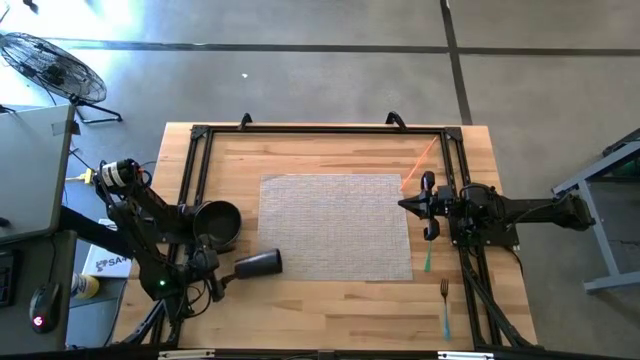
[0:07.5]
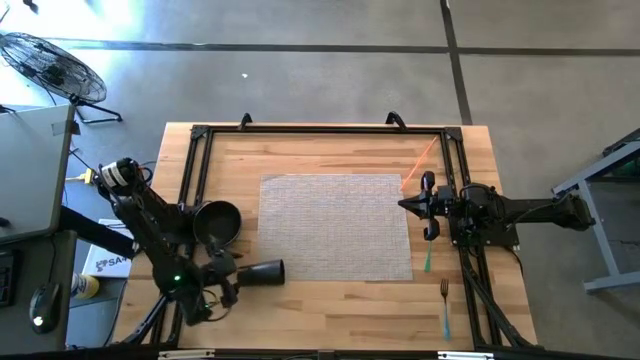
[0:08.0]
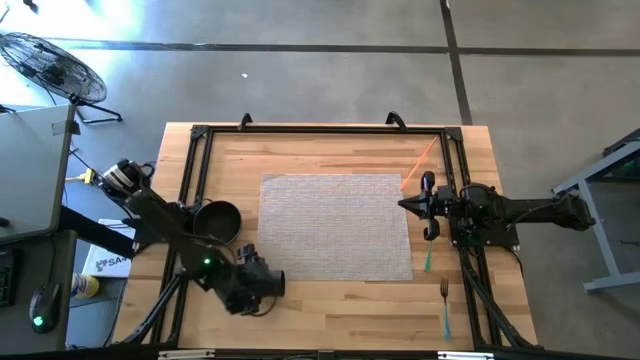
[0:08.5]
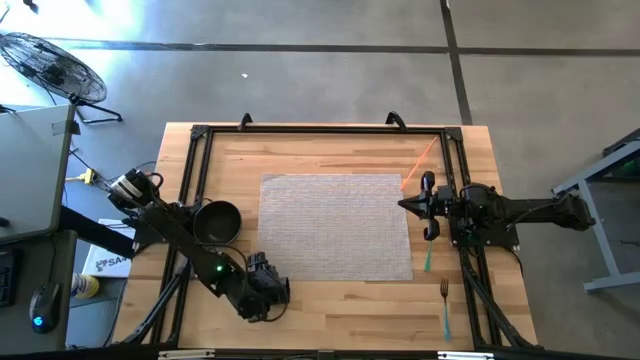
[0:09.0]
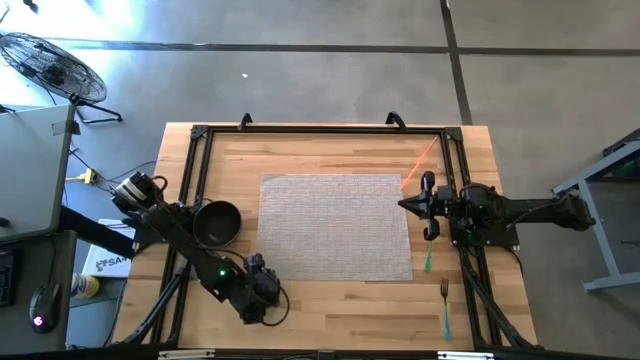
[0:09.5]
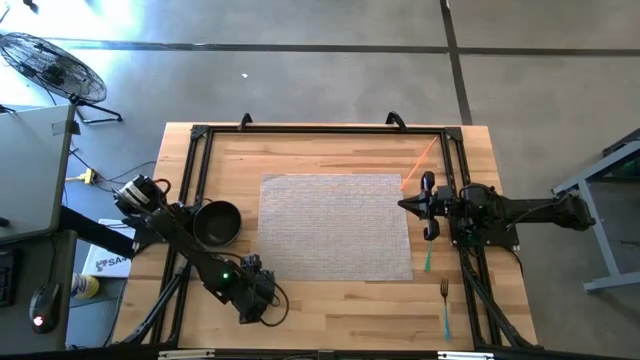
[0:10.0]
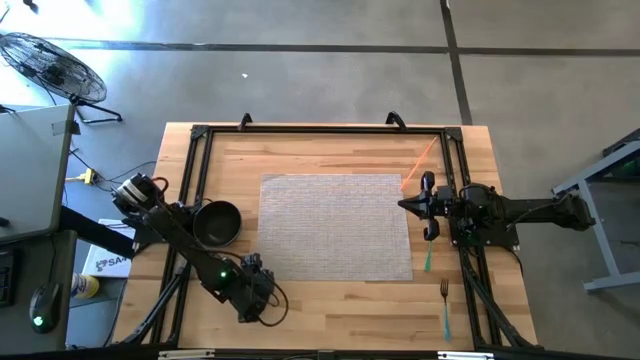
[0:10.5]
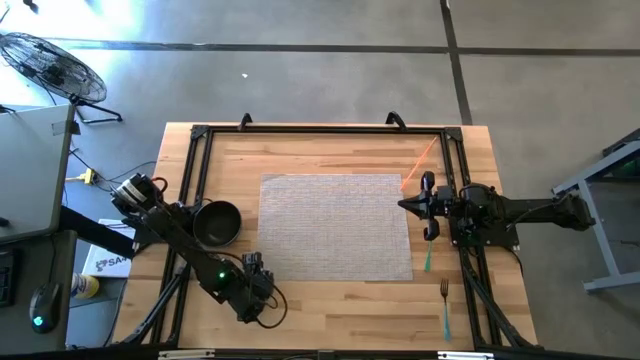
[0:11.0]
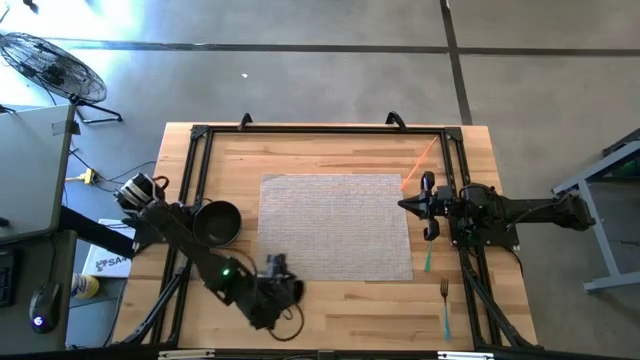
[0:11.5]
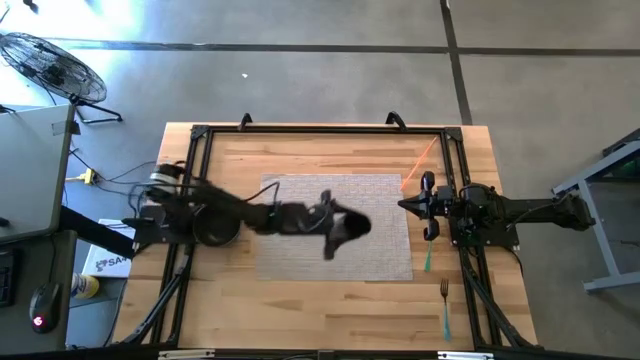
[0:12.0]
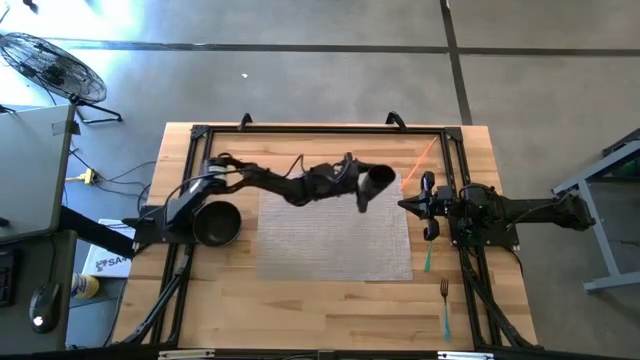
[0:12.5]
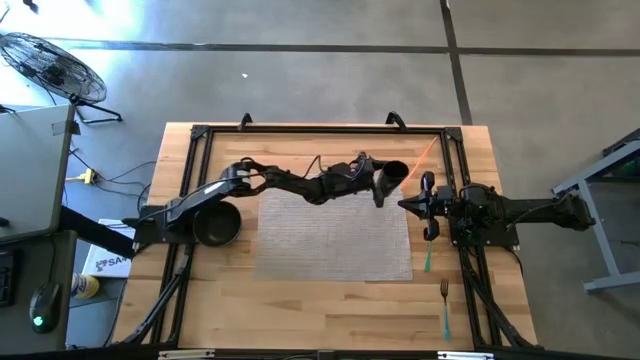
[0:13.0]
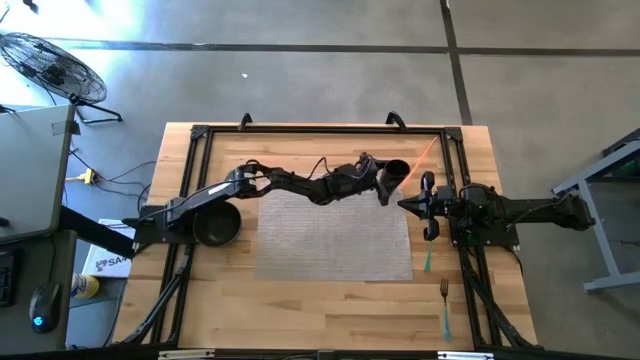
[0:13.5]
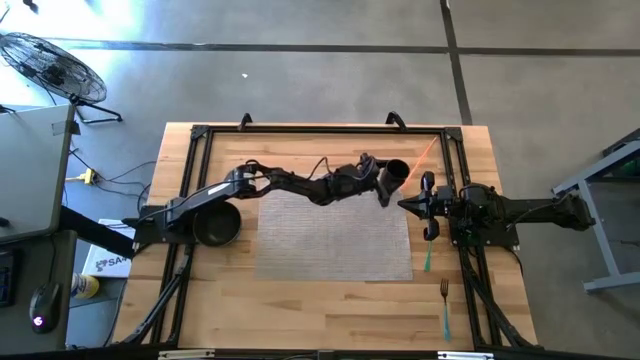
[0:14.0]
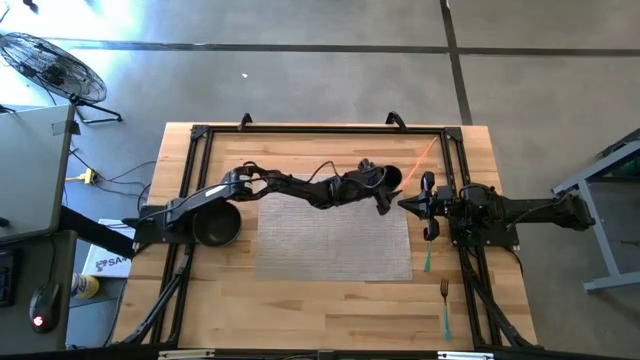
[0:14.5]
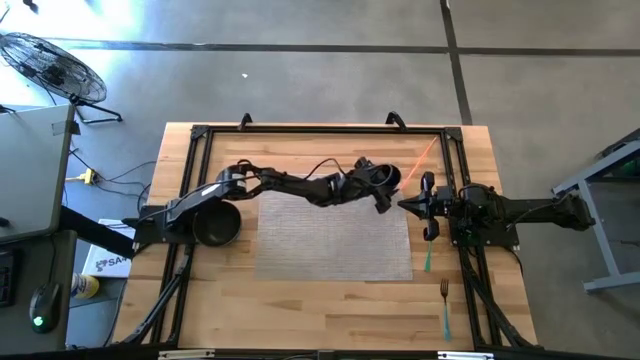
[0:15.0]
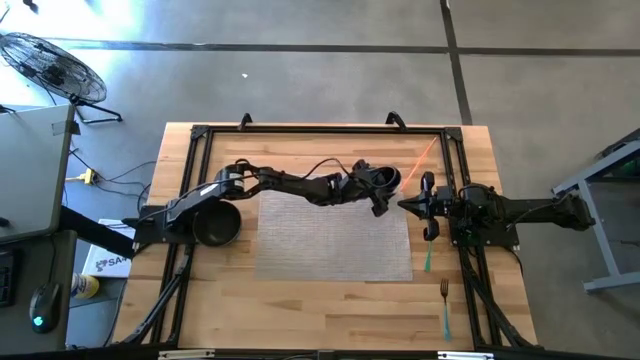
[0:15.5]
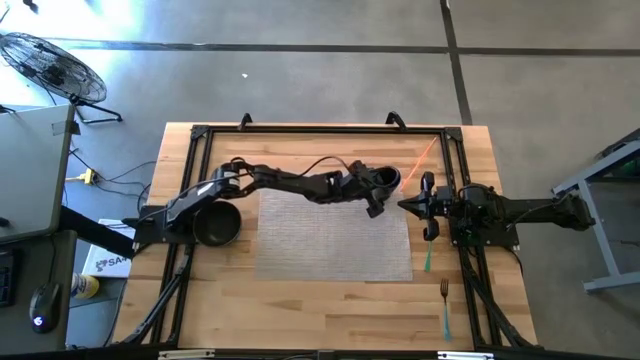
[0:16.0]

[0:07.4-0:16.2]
Task: Pick & Place Utensil
Put the black cup on the top right of the gray mat

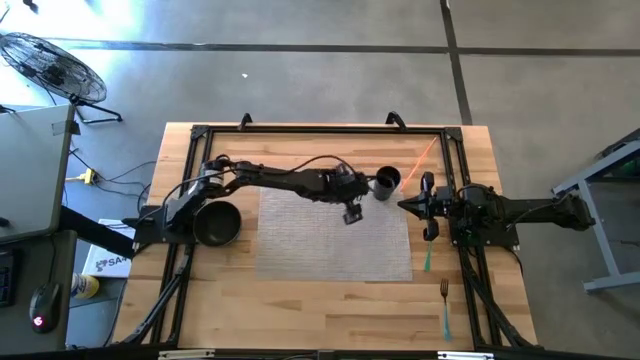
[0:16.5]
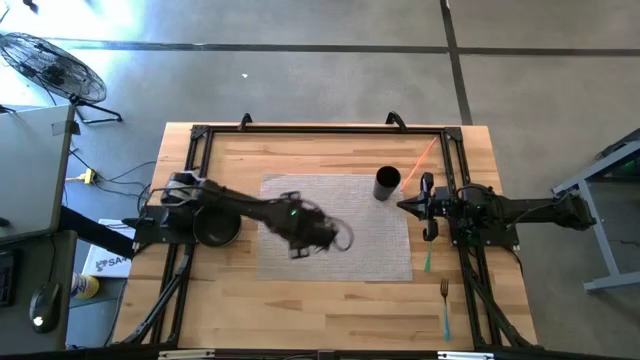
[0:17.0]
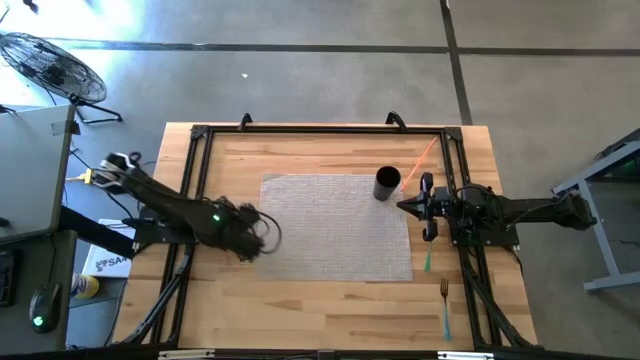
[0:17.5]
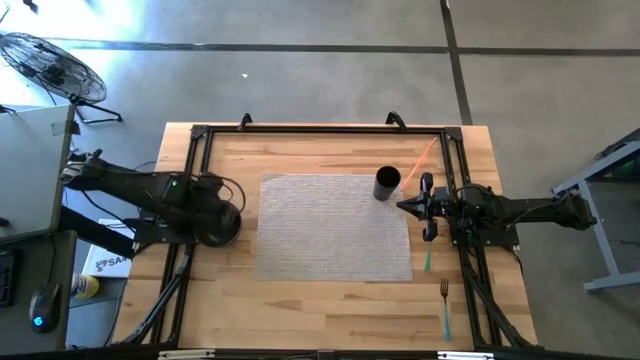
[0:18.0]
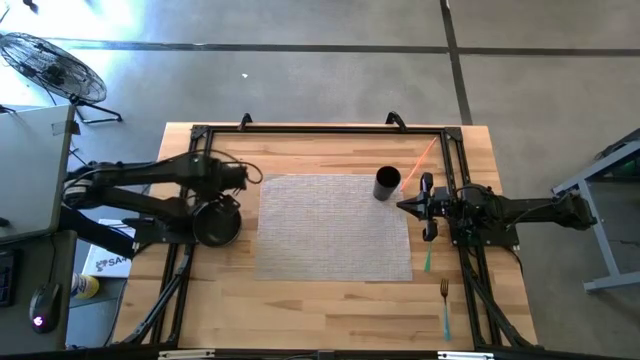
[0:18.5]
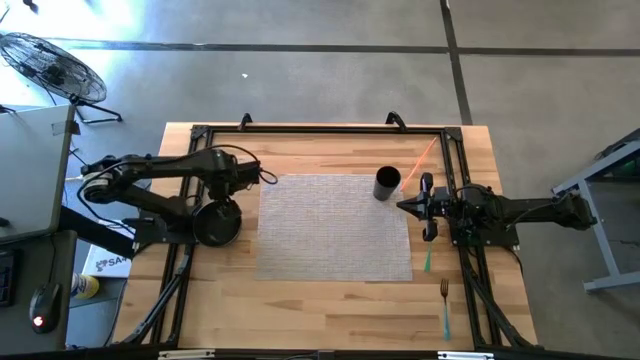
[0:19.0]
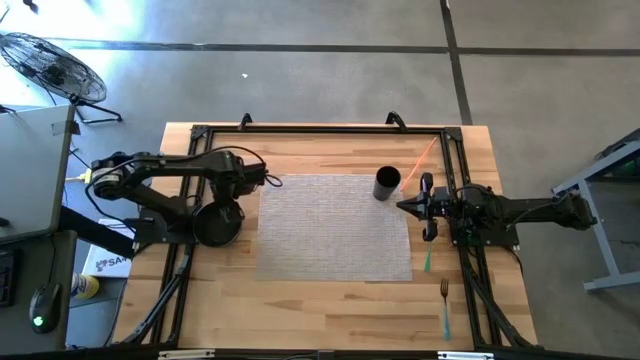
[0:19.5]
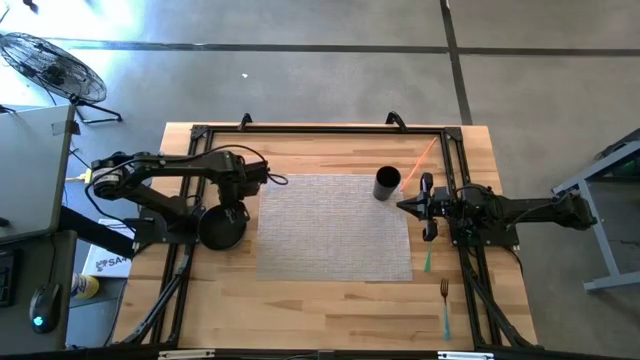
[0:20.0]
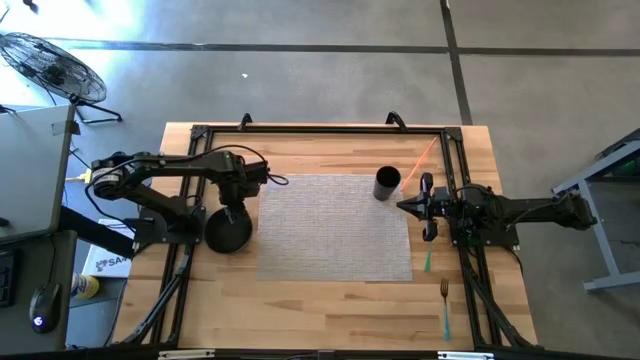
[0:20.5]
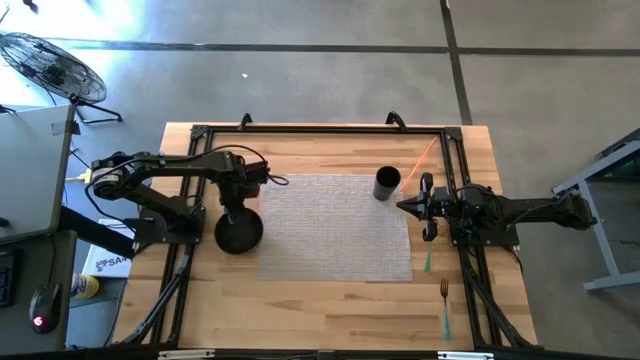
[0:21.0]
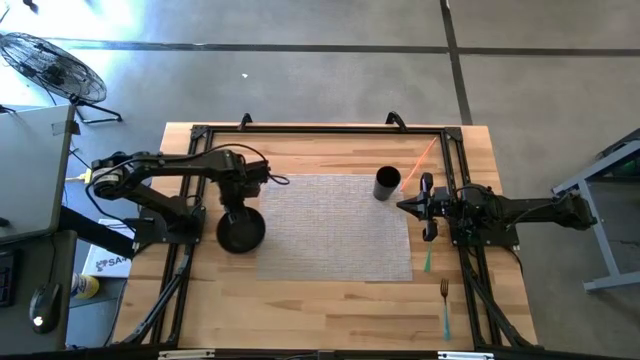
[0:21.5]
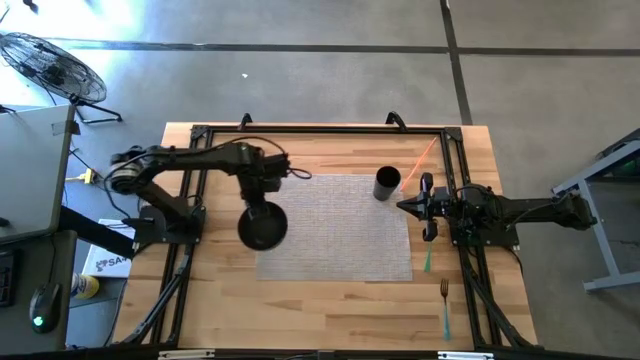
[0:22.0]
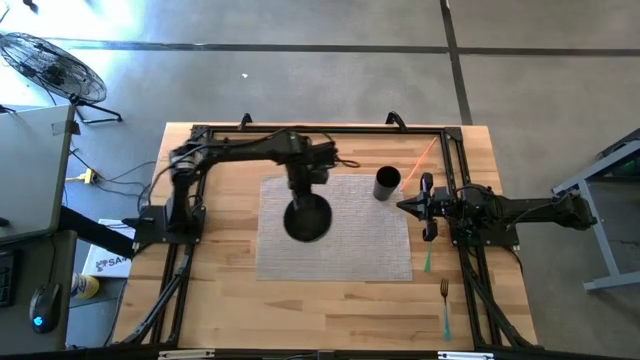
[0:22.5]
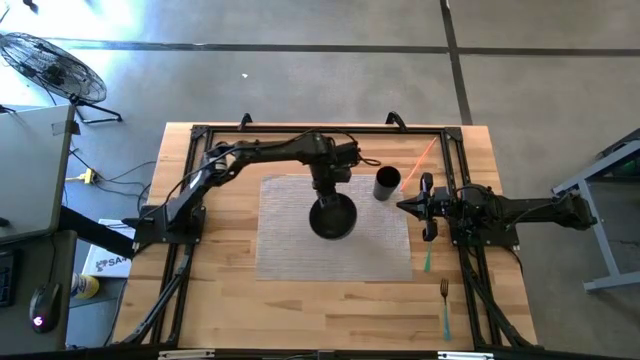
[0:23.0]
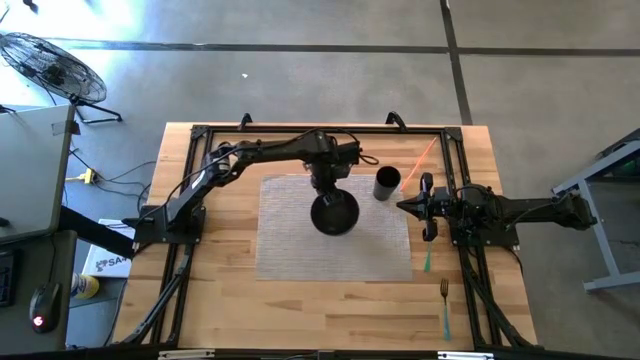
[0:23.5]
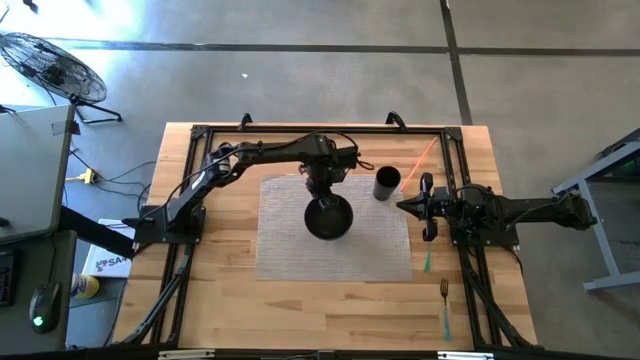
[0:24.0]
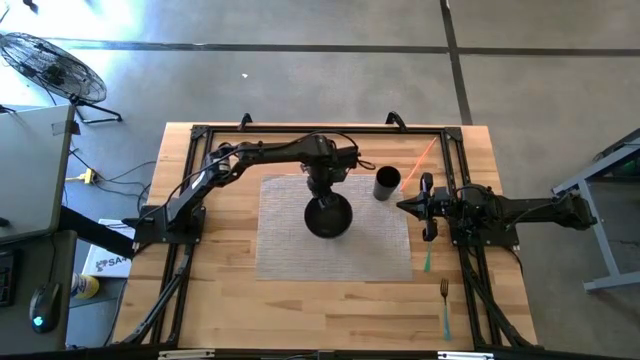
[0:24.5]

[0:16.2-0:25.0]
Put the black bowl on the gray mat to the bottom left of the black cup

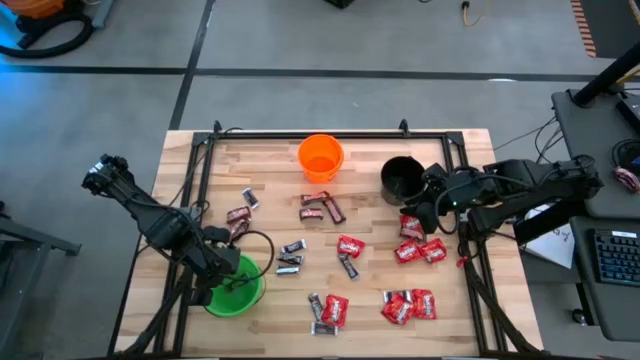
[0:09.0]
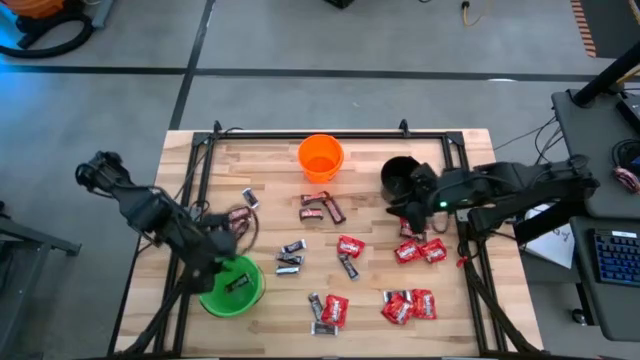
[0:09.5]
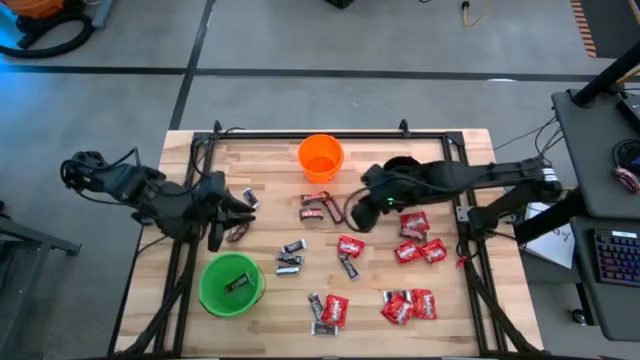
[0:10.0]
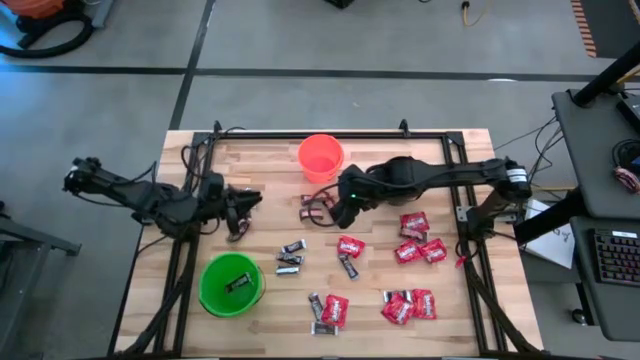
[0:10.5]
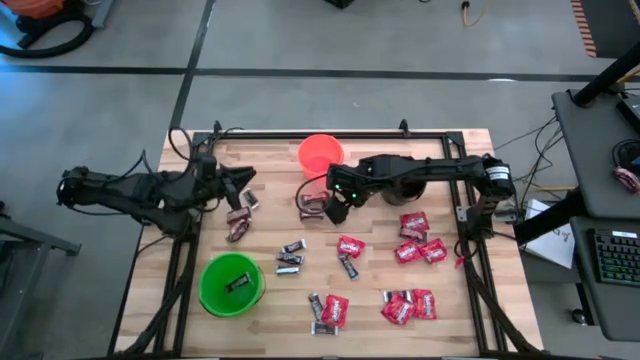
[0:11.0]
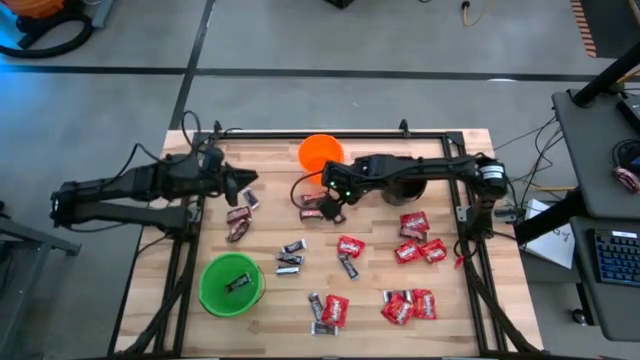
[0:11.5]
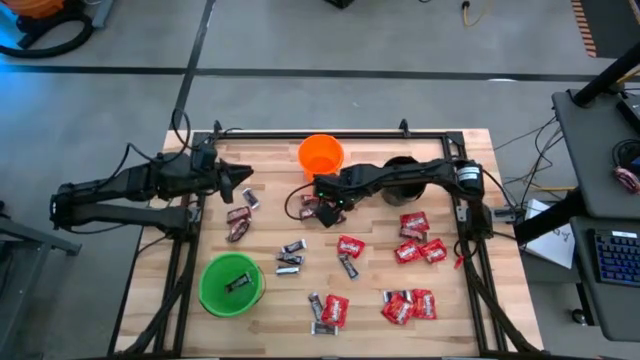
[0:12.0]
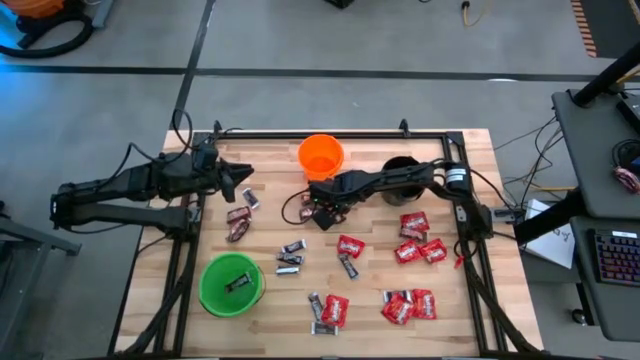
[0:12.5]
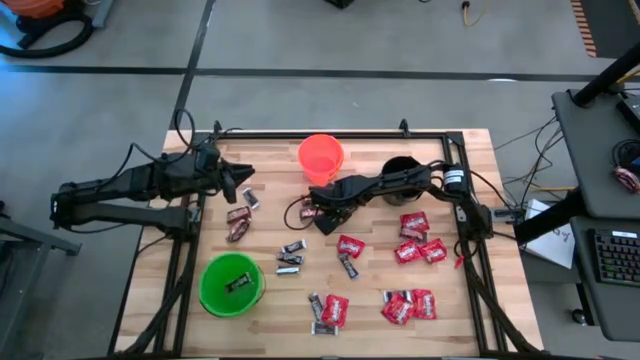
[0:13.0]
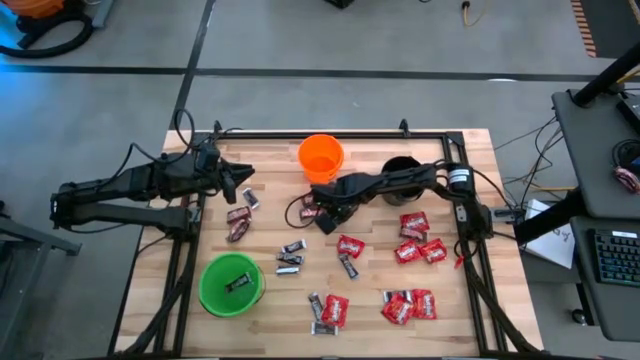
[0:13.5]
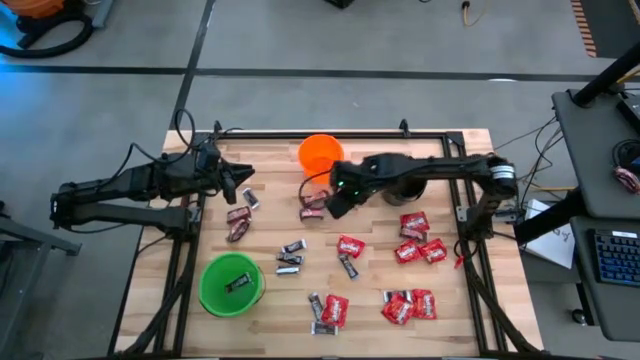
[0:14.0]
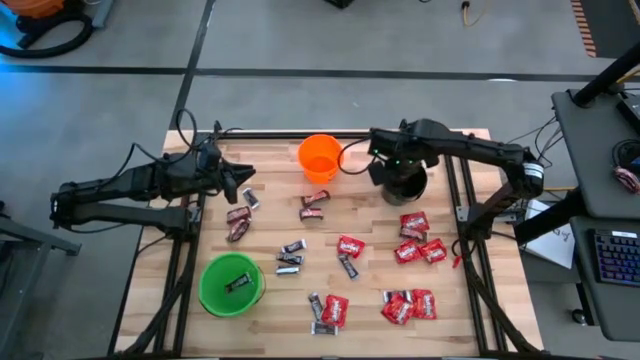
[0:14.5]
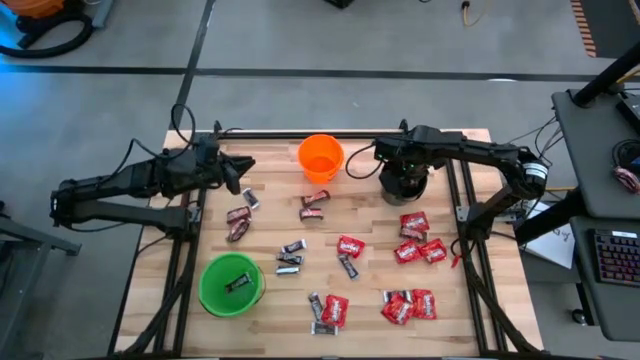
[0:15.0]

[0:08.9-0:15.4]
Task: Sort candy
Put the brown chocolate into the black bucket
